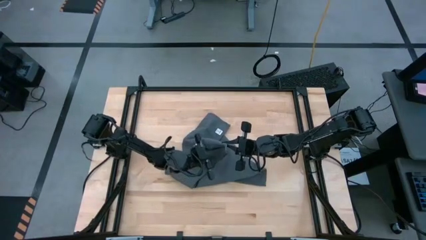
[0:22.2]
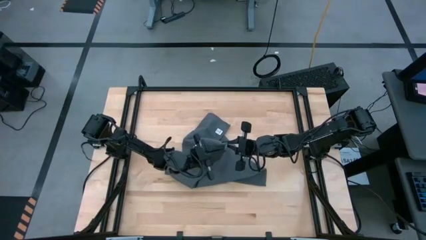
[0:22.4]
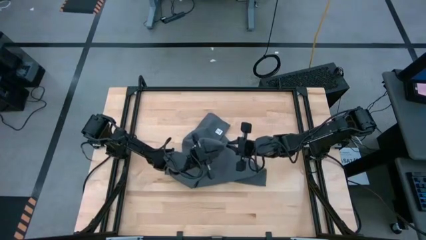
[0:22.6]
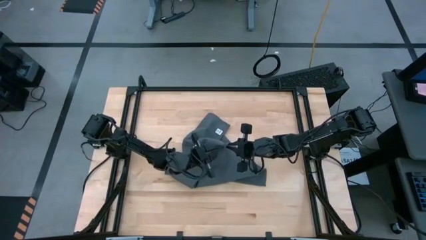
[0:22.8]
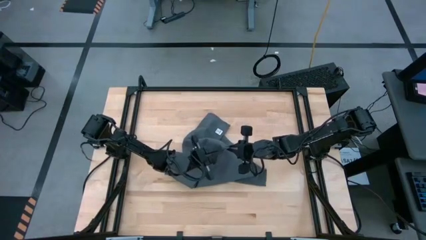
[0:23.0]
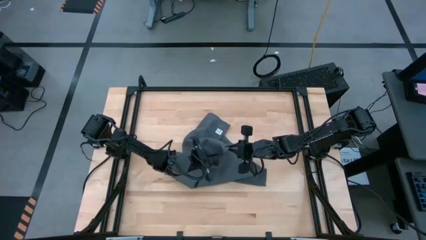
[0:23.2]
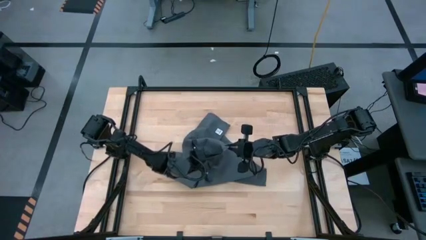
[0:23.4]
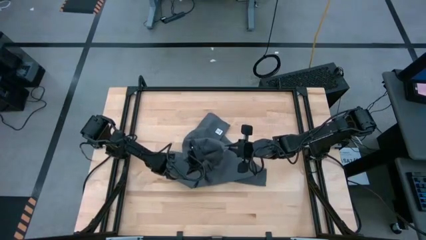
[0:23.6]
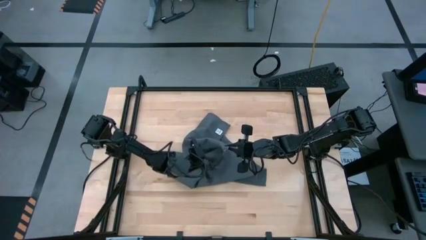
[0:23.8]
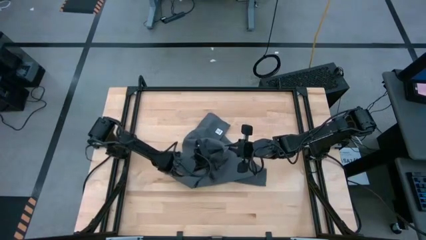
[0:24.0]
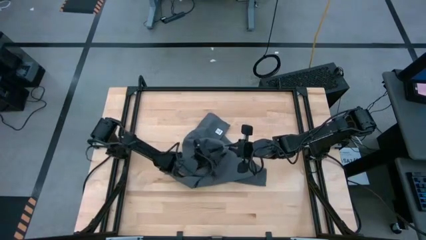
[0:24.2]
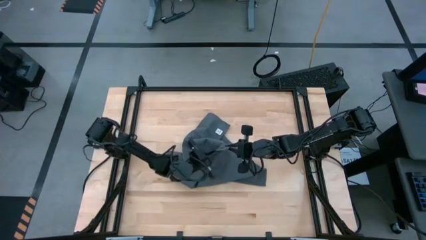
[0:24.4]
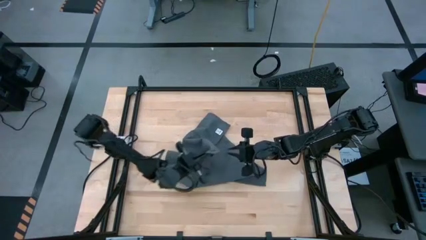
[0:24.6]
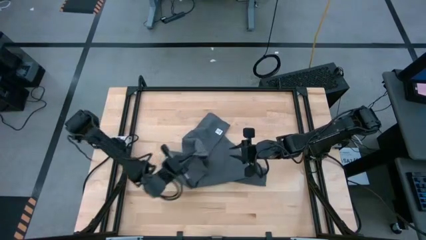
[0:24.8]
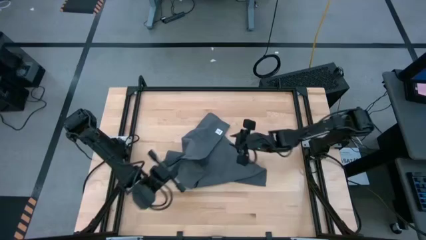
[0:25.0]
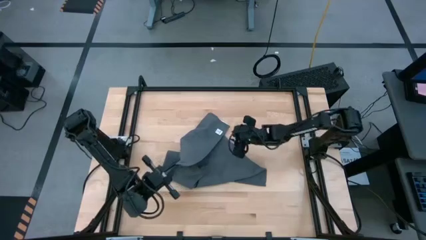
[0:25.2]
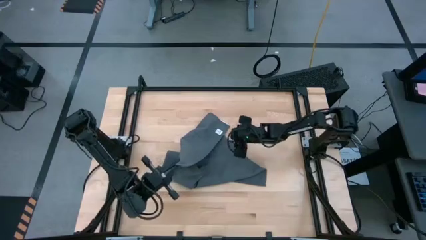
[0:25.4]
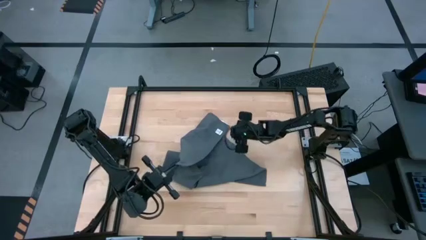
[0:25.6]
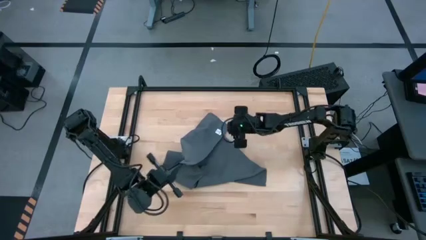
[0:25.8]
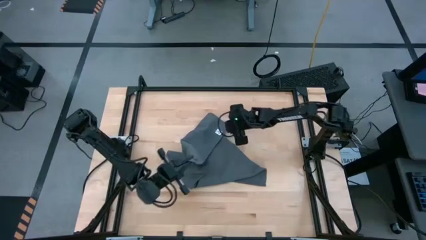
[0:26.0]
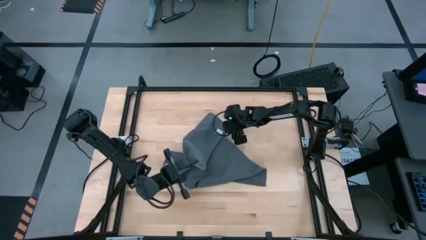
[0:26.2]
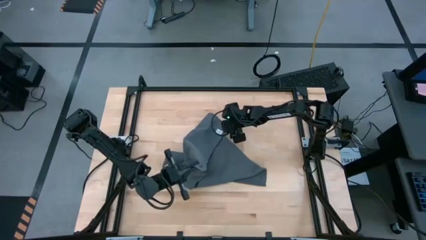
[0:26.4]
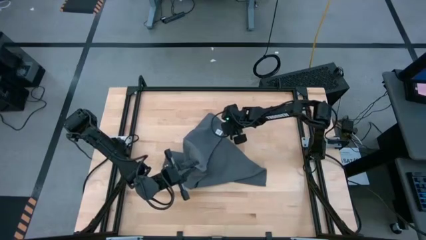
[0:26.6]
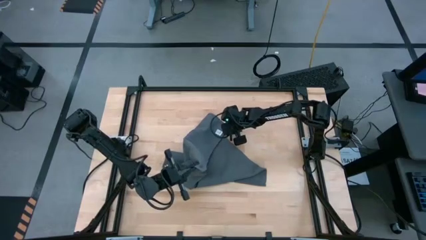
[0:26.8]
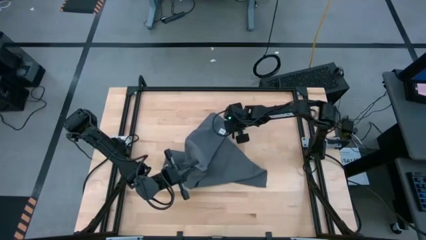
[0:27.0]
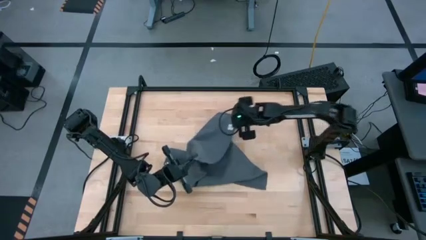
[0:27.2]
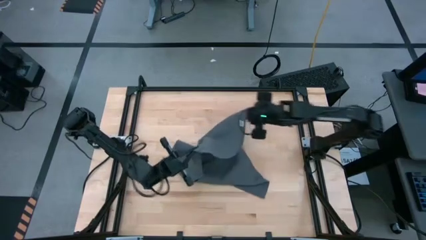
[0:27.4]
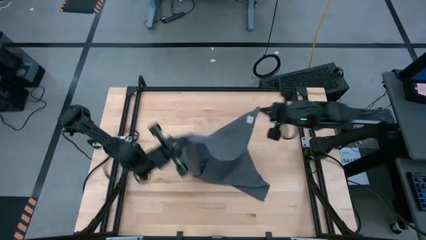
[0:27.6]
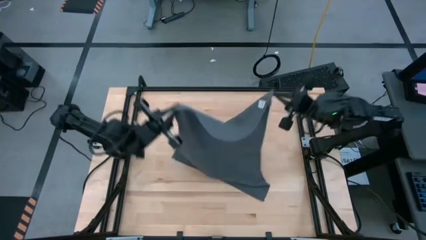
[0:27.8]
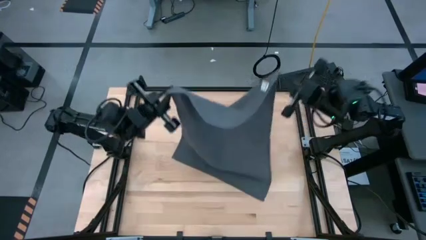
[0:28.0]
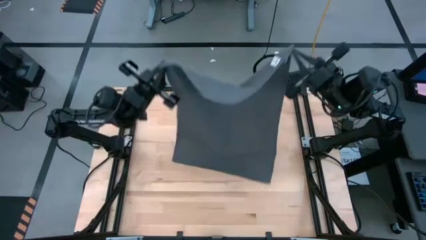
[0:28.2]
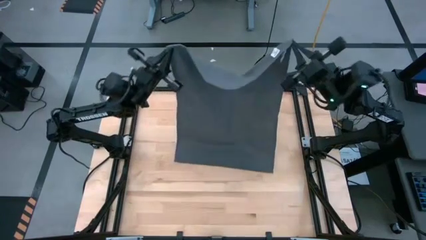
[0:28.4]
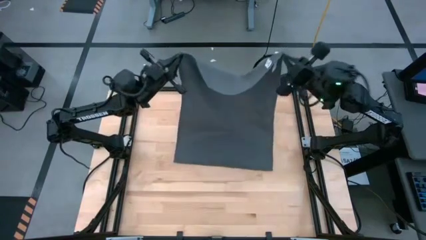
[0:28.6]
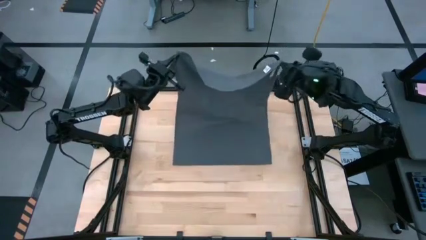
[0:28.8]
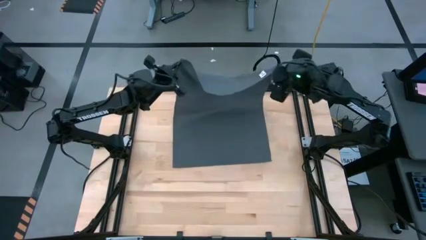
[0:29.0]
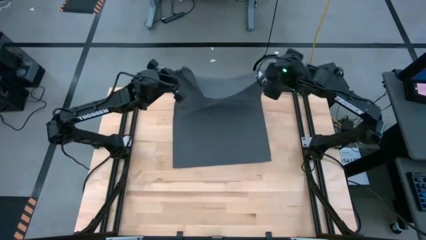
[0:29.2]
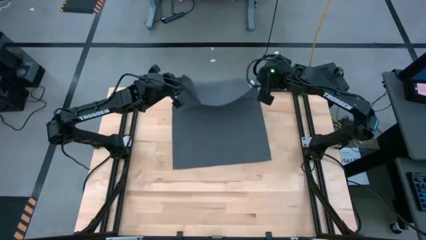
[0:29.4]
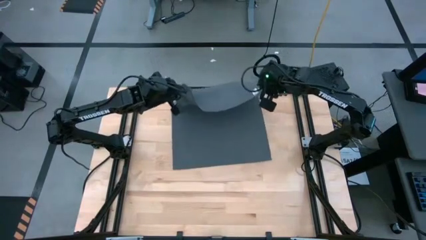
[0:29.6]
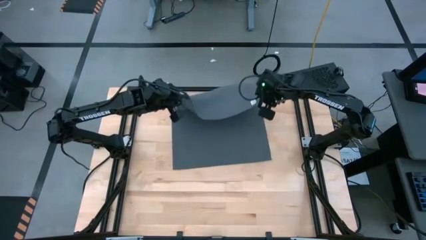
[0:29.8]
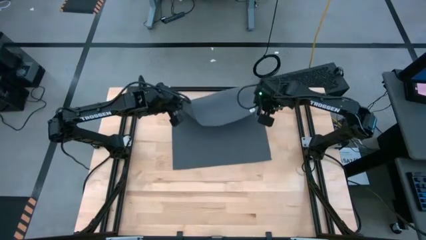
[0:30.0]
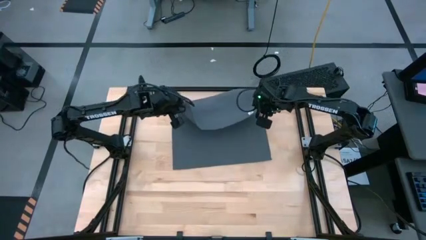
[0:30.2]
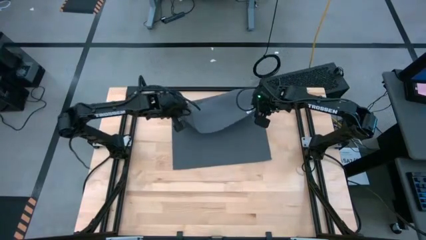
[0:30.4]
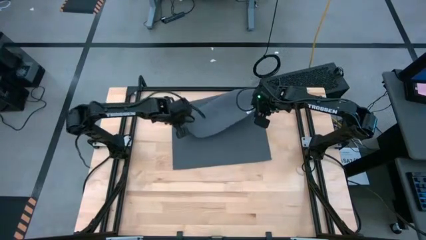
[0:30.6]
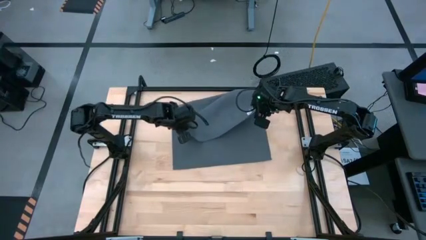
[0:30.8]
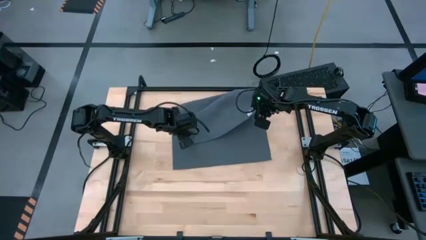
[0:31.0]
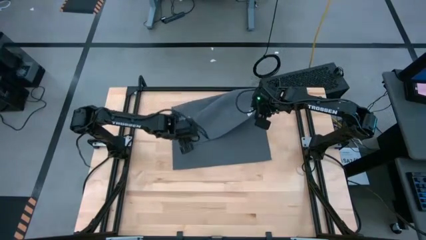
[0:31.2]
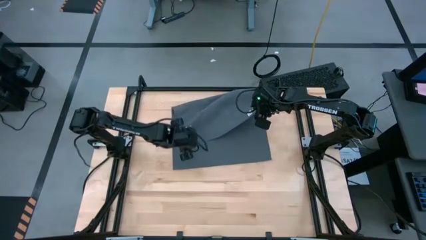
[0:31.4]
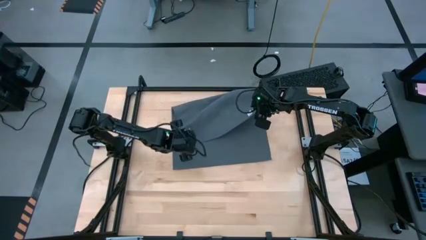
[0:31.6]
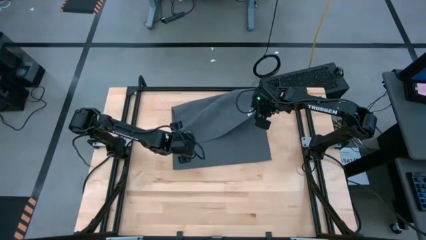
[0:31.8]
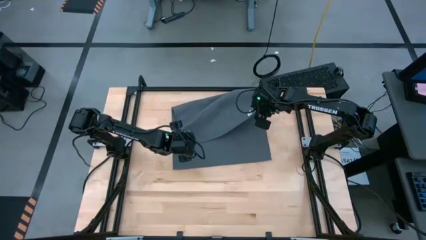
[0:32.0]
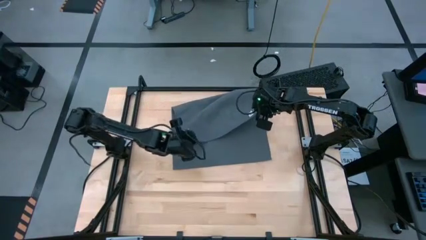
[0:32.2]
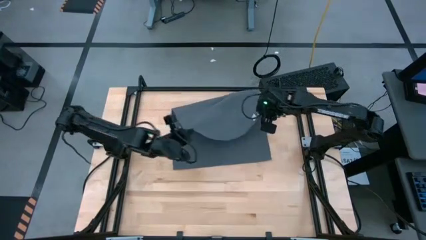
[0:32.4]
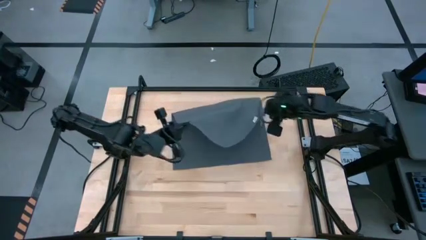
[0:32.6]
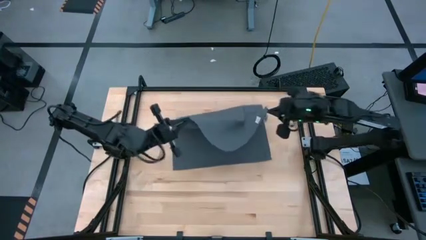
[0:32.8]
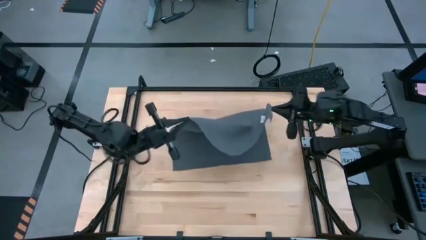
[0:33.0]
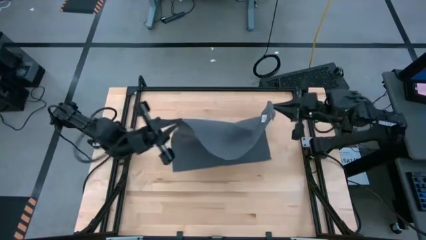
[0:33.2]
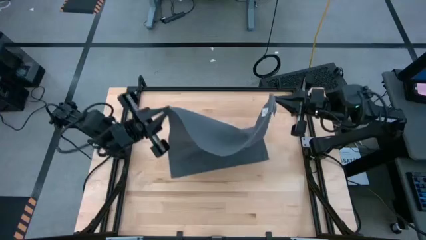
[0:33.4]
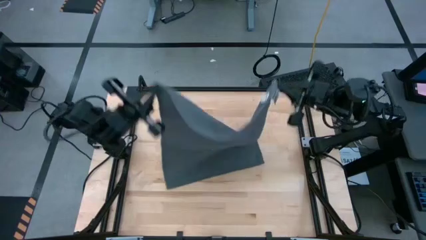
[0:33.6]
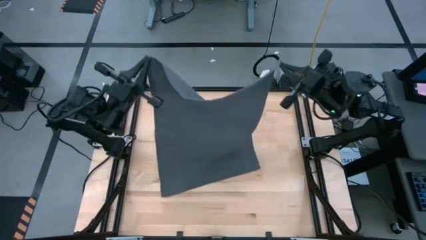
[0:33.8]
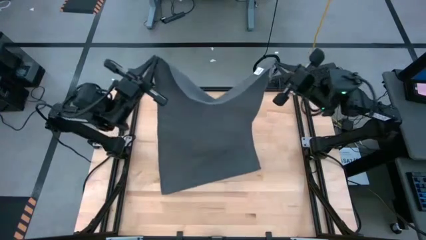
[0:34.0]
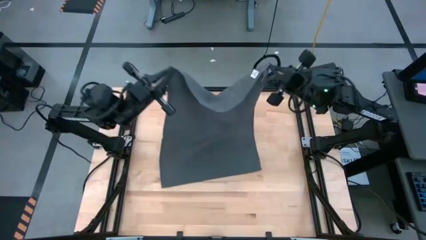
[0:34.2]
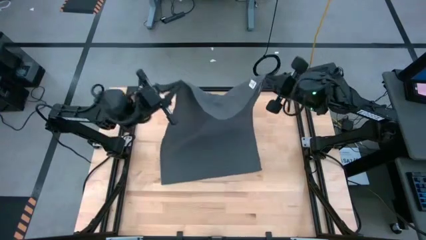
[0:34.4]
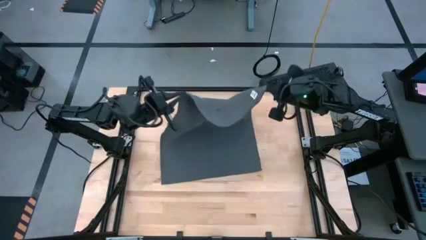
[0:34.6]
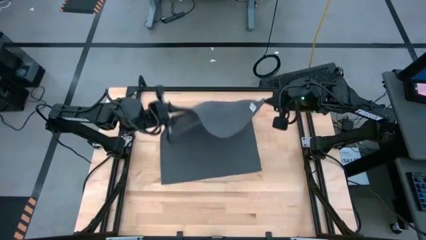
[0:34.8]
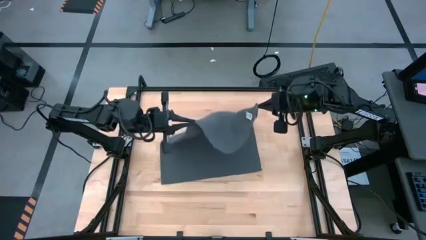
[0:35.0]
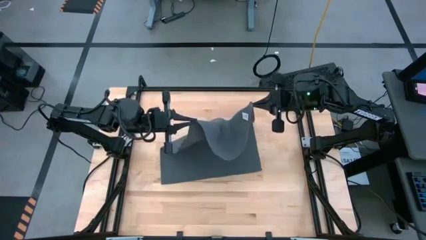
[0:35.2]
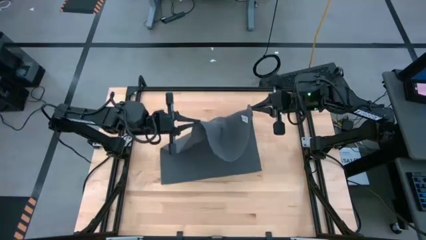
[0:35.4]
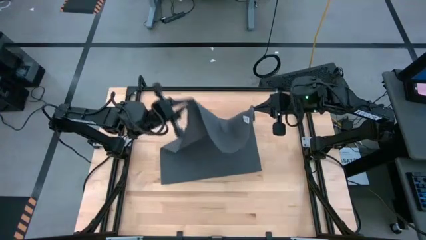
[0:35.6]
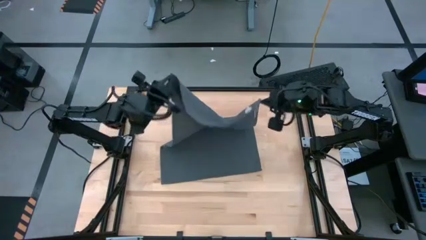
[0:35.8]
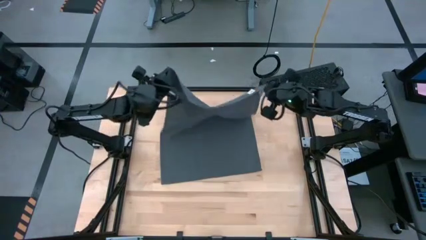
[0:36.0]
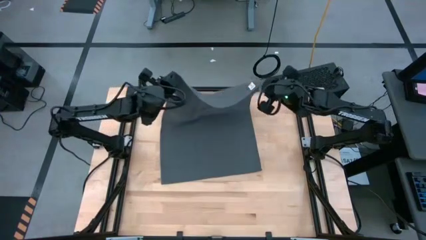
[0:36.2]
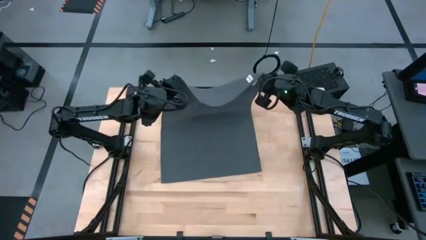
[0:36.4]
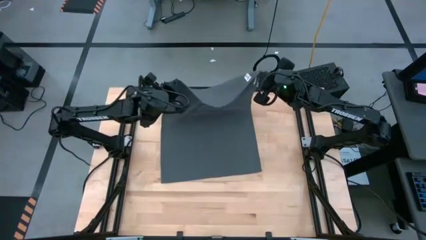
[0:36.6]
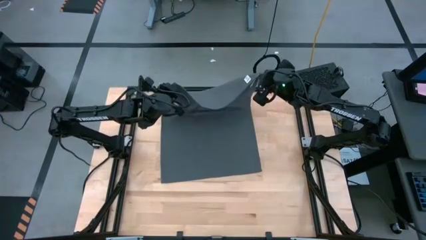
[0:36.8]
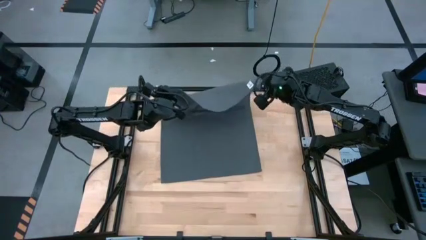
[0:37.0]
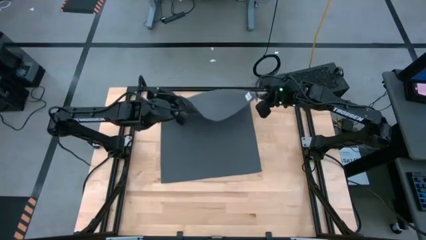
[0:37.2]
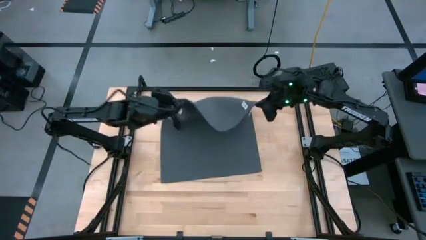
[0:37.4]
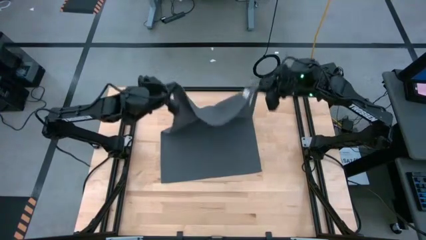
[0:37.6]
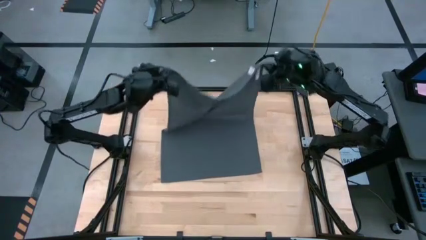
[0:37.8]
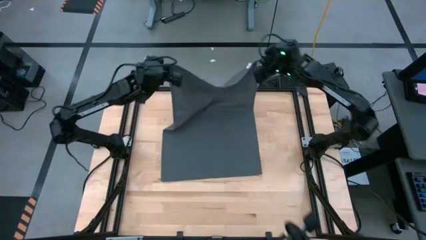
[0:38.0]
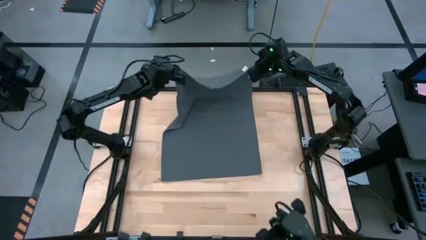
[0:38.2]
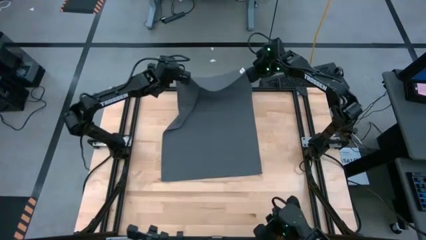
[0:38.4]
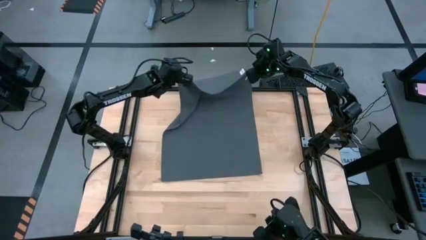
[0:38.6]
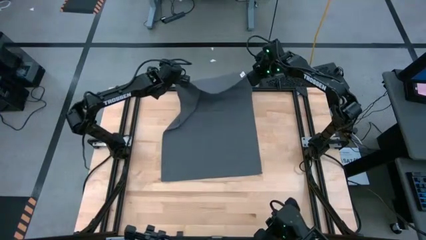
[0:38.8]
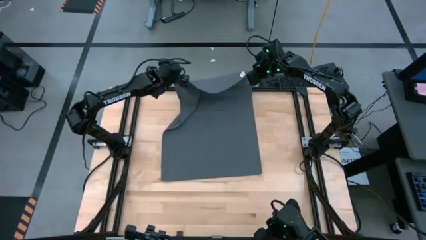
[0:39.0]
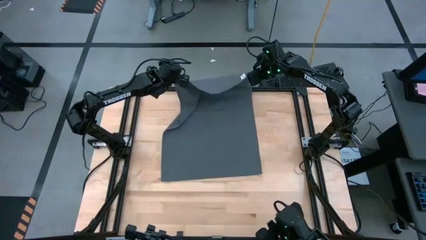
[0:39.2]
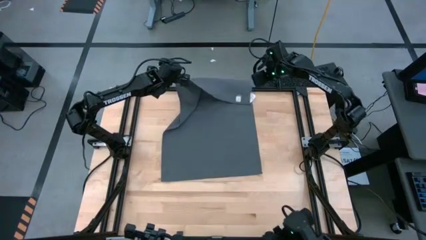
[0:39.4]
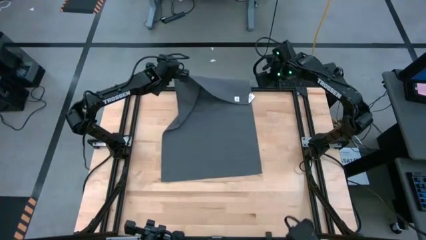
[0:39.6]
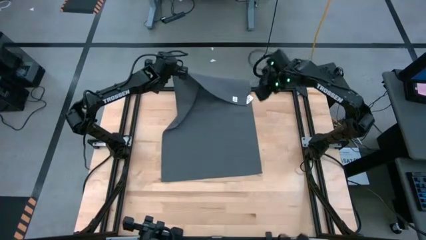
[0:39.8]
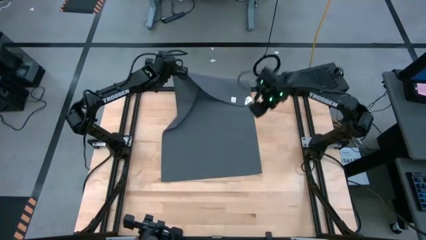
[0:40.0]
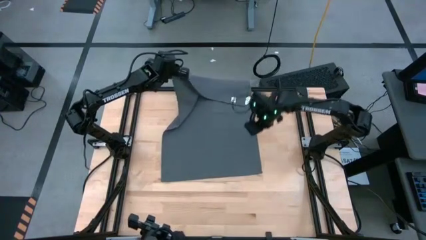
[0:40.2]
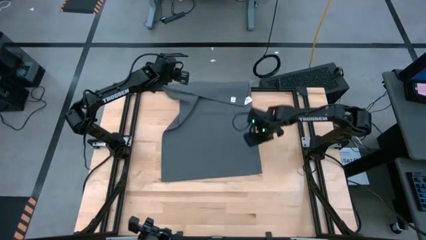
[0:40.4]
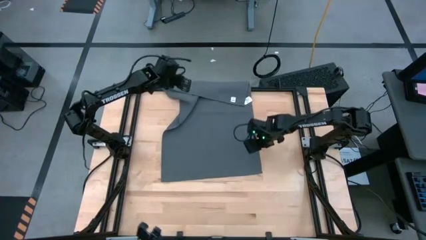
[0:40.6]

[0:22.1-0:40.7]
Task: Roll towel into tight, uniform cylinder
Roll the towel
